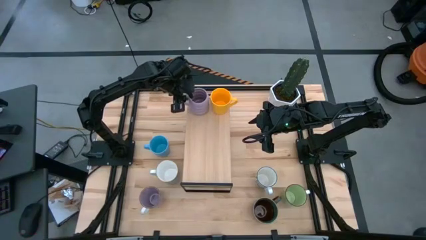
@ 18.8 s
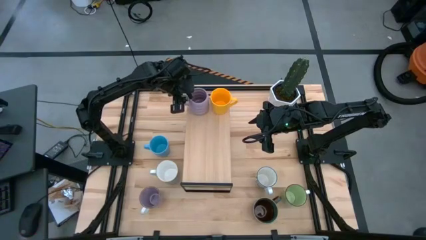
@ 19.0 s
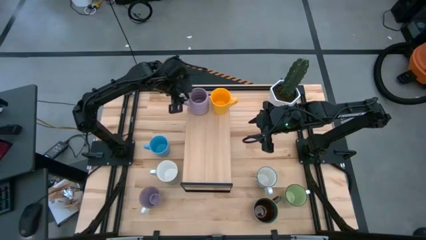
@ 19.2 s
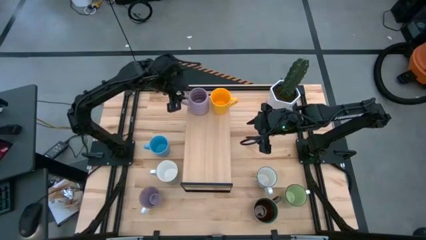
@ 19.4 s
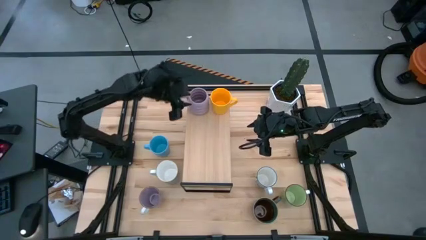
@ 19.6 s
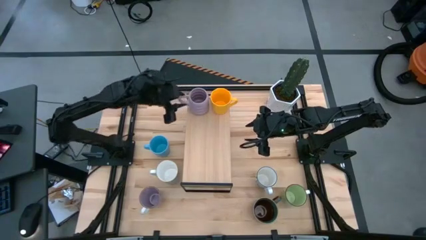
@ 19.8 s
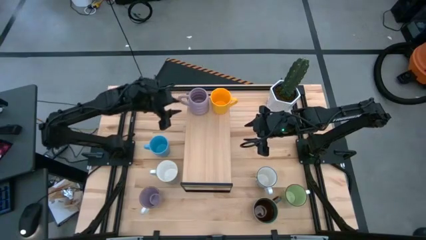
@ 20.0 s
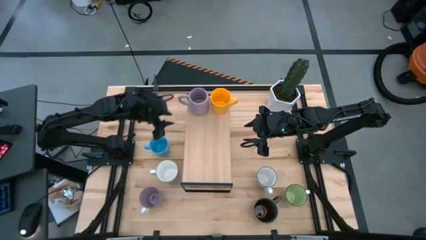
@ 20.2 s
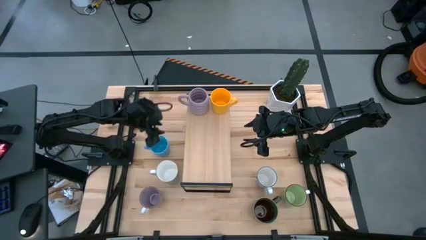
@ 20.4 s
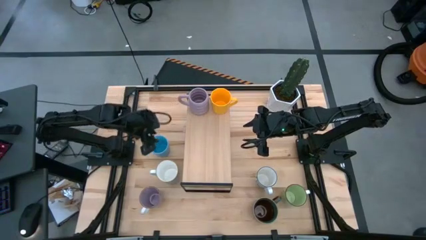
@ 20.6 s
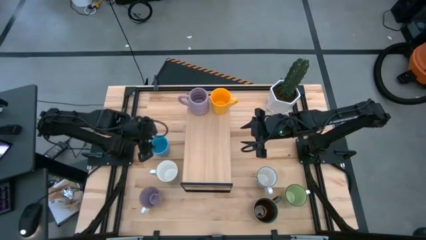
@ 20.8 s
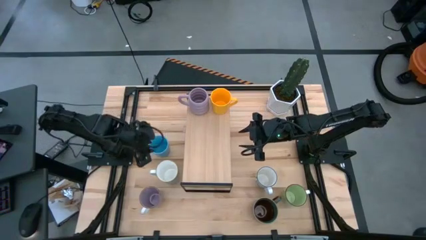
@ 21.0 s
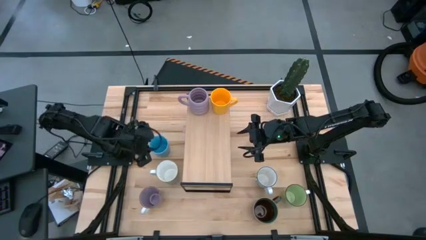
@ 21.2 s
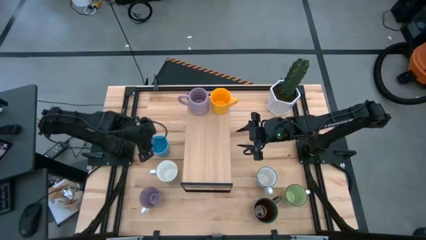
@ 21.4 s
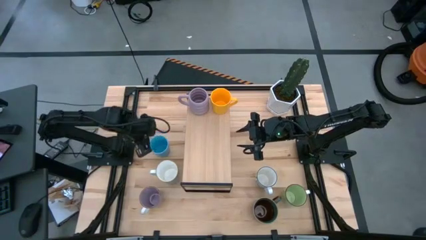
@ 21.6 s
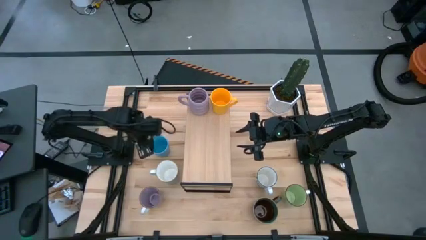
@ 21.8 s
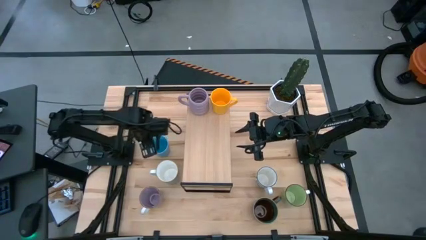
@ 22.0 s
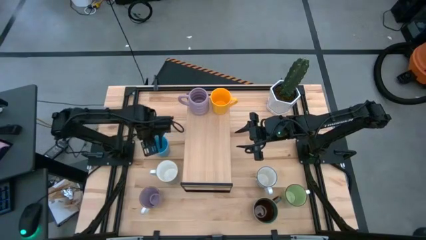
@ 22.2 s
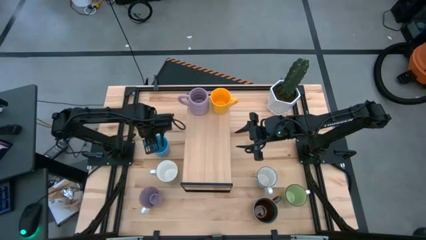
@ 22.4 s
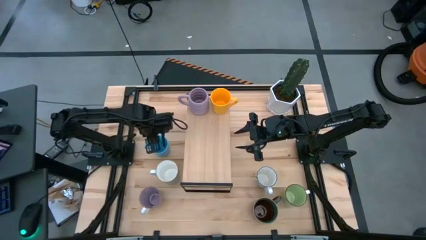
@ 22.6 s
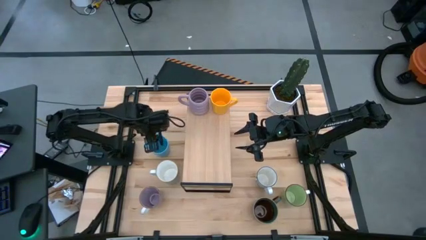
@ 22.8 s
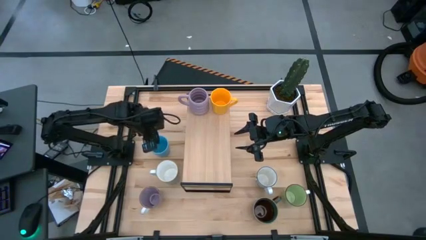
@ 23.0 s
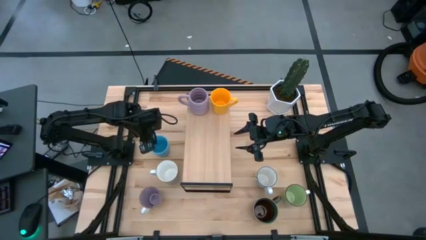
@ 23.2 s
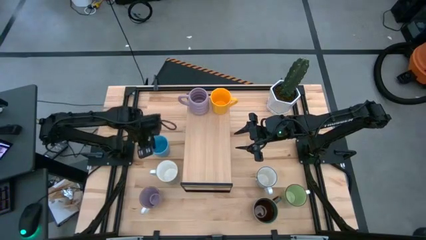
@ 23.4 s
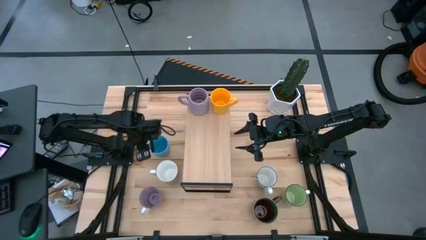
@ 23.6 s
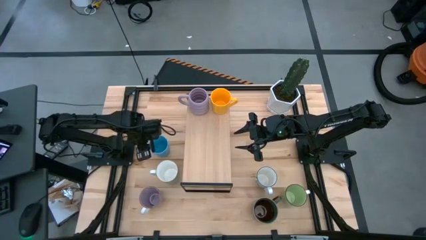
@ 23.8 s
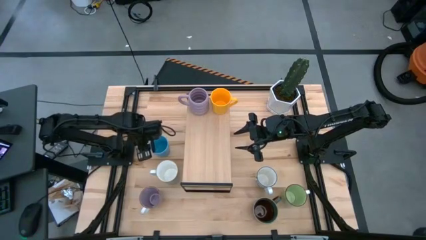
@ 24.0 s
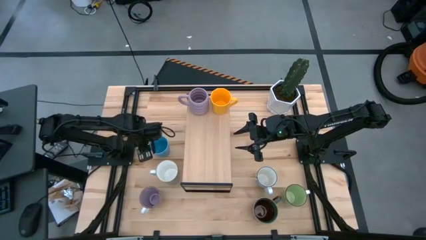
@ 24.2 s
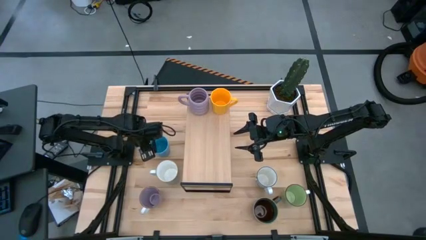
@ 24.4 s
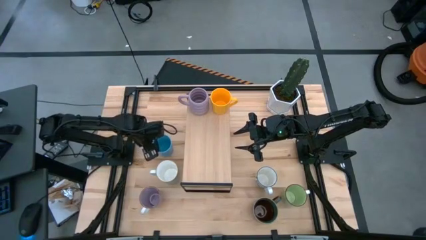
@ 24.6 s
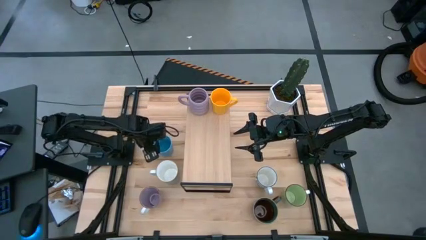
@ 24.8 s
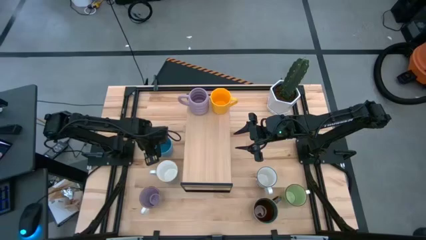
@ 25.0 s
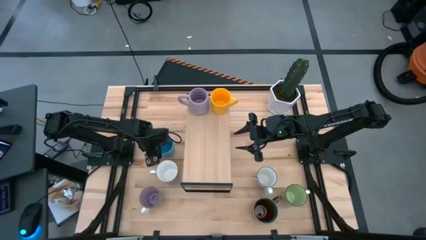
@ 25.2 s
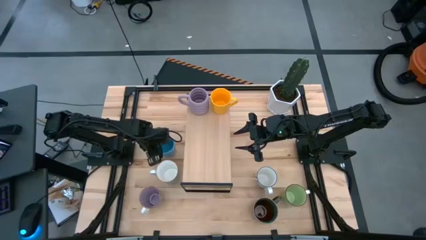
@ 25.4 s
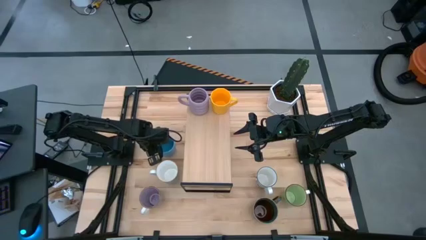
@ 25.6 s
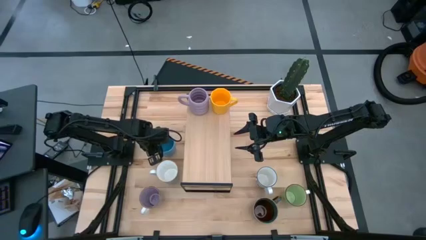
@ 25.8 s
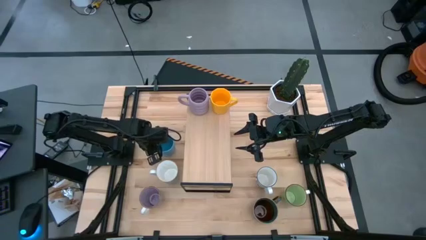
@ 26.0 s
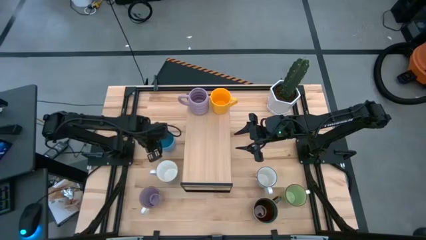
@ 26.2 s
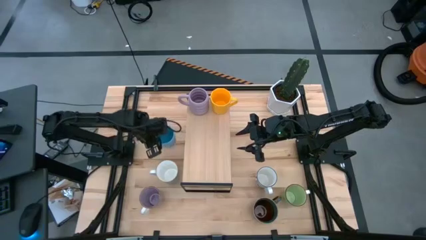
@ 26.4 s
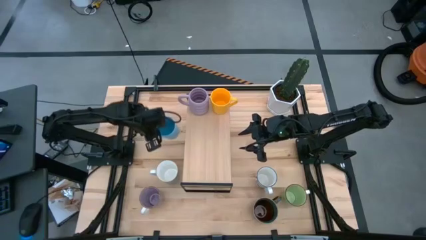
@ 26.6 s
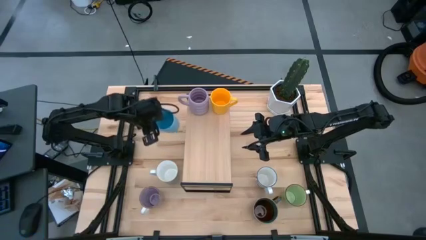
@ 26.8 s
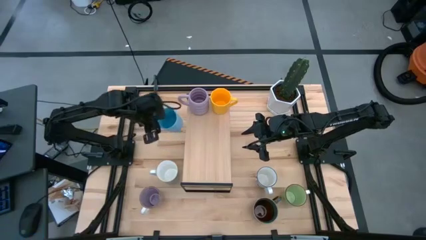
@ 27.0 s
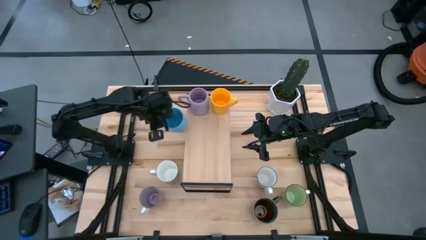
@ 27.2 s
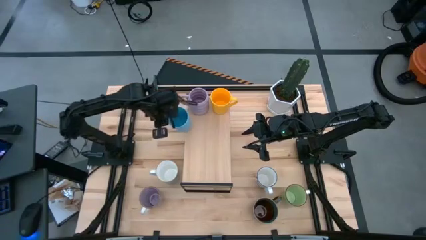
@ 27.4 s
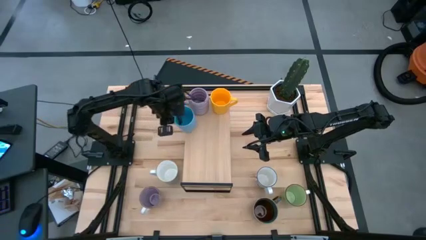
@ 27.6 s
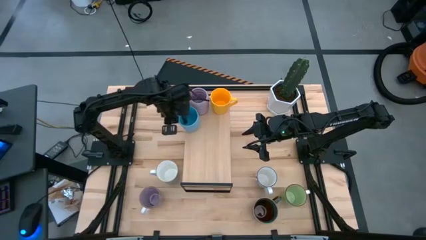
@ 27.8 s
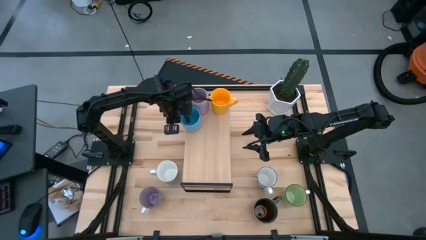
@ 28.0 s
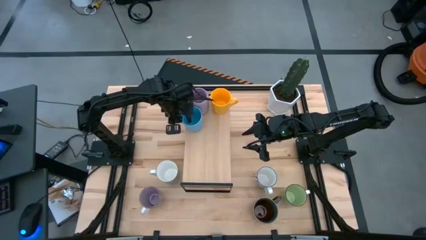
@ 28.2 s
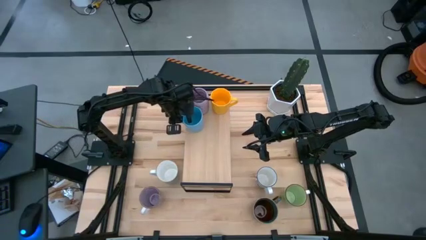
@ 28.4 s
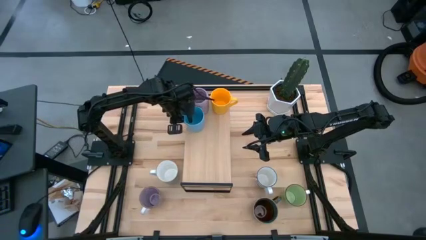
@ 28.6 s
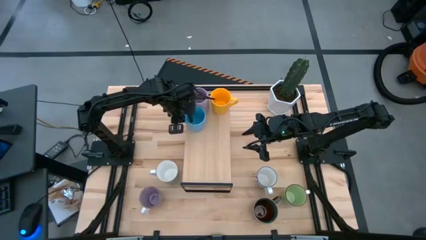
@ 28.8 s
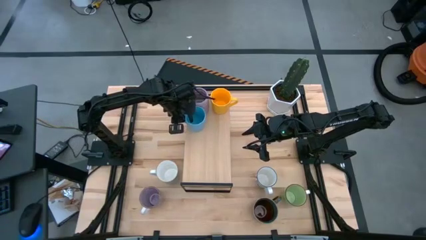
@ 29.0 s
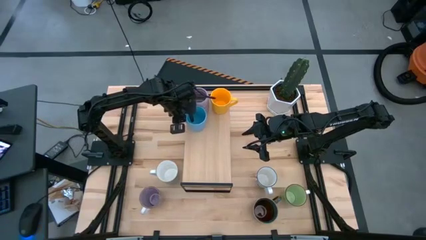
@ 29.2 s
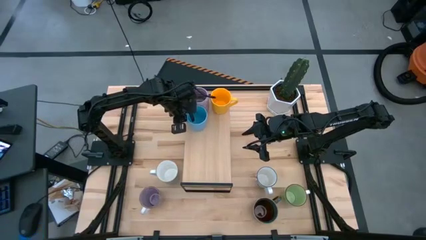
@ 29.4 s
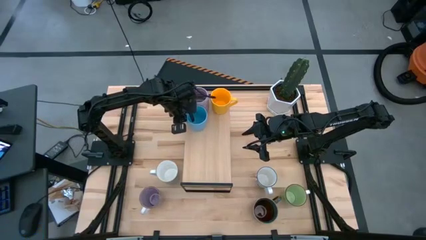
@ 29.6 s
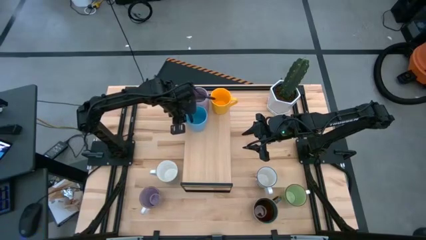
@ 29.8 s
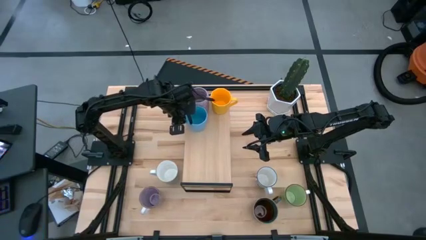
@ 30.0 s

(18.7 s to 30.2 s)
Task: Place coffee mugs
Put the light blue mug on the shelf
